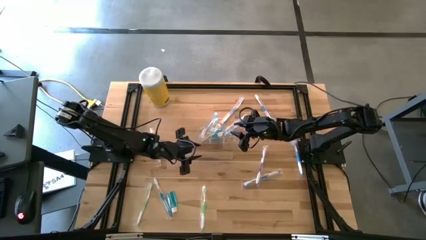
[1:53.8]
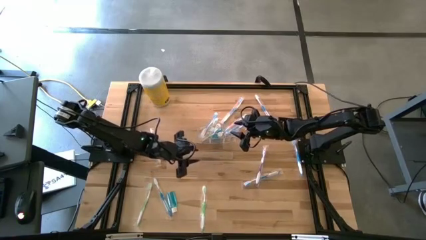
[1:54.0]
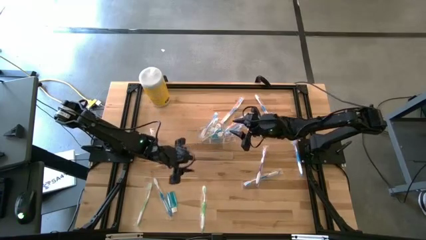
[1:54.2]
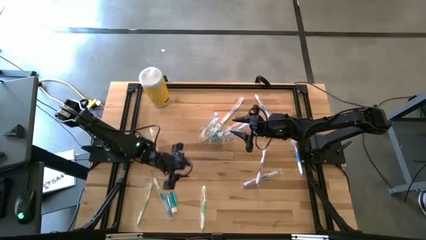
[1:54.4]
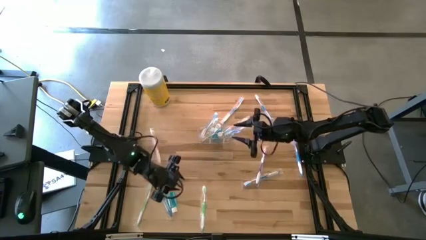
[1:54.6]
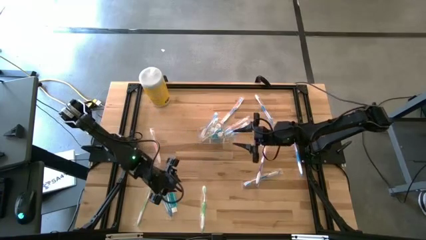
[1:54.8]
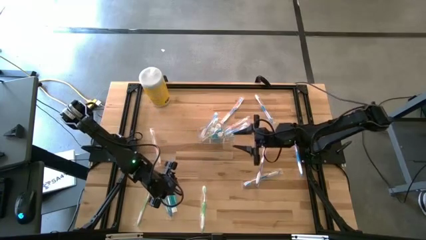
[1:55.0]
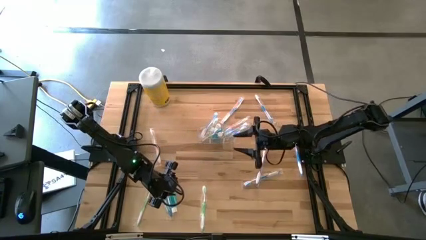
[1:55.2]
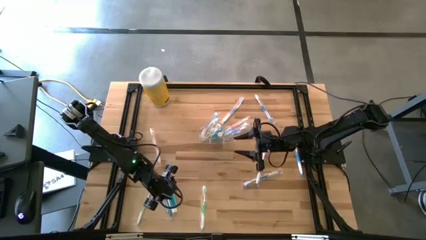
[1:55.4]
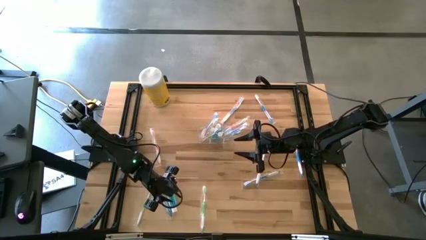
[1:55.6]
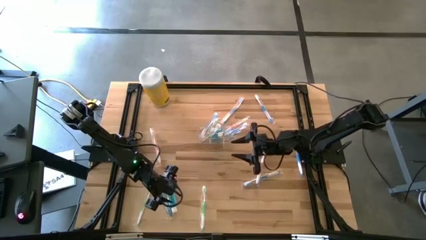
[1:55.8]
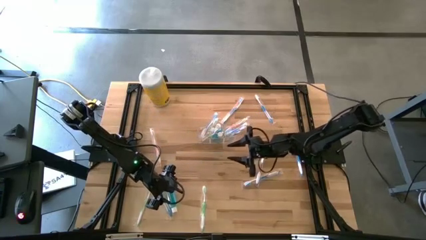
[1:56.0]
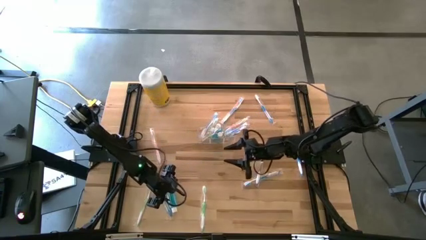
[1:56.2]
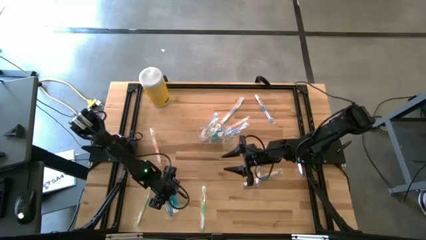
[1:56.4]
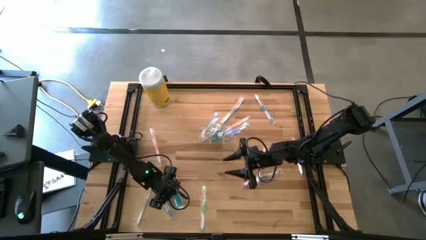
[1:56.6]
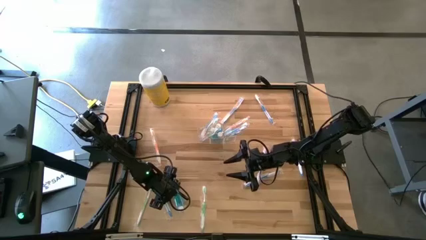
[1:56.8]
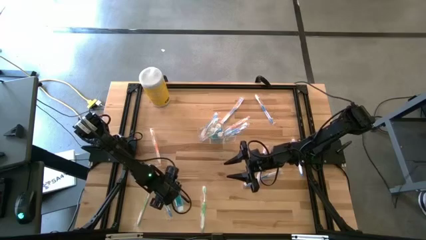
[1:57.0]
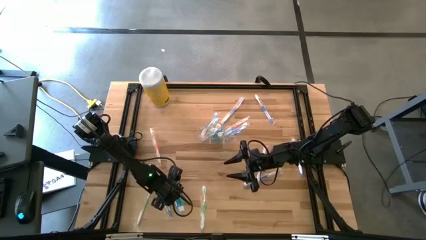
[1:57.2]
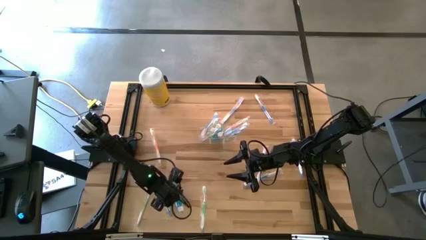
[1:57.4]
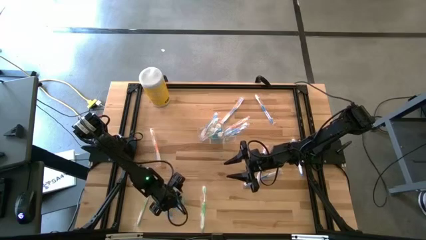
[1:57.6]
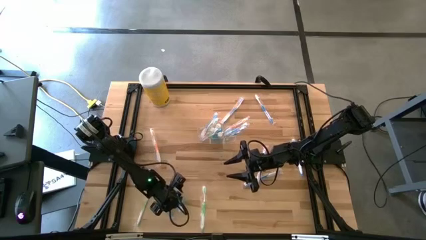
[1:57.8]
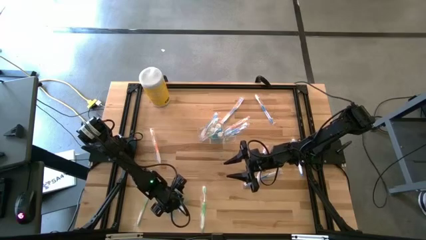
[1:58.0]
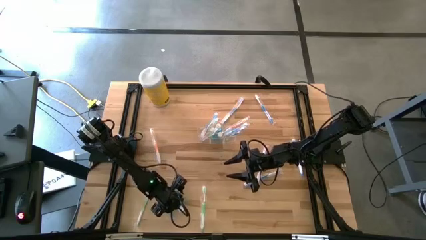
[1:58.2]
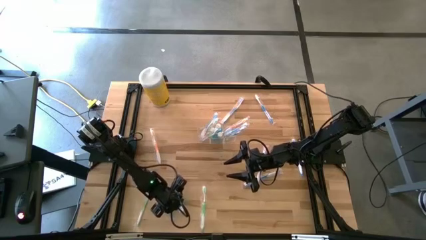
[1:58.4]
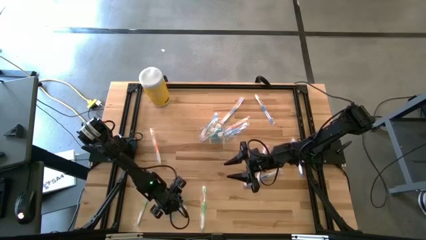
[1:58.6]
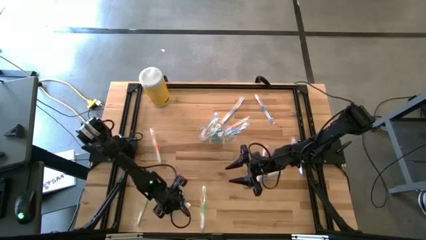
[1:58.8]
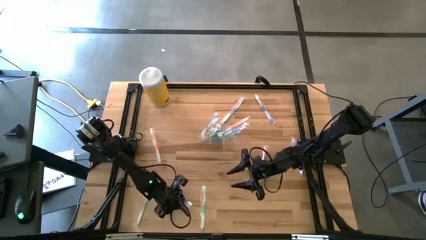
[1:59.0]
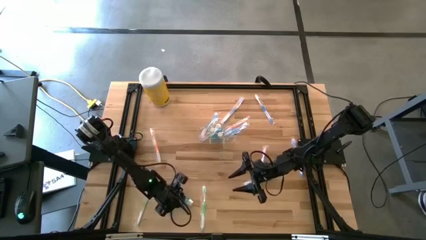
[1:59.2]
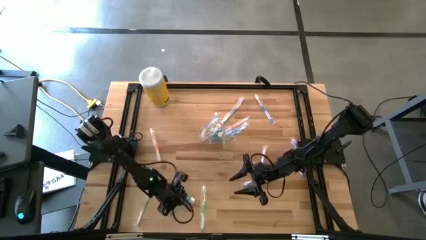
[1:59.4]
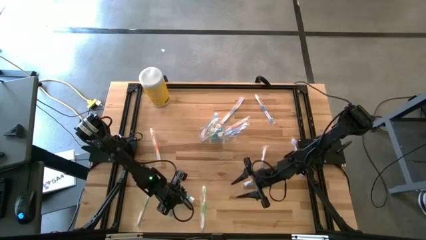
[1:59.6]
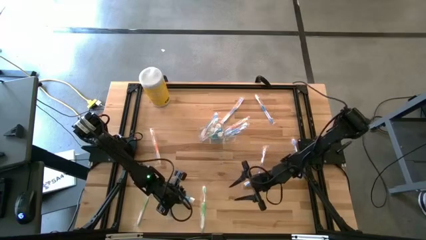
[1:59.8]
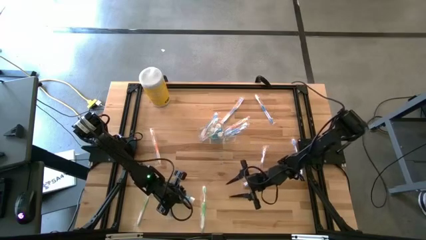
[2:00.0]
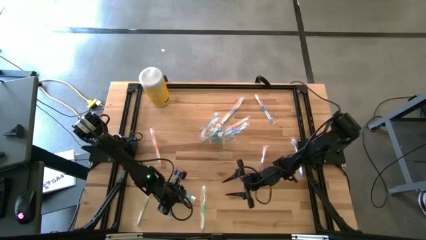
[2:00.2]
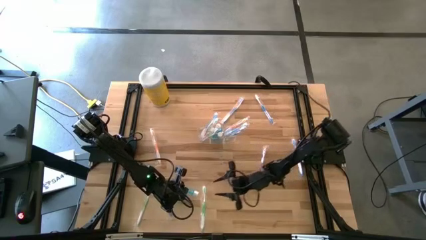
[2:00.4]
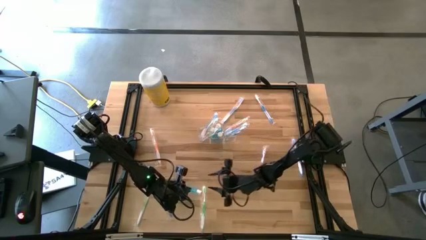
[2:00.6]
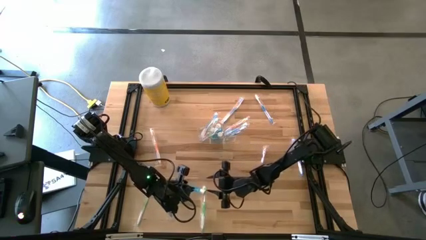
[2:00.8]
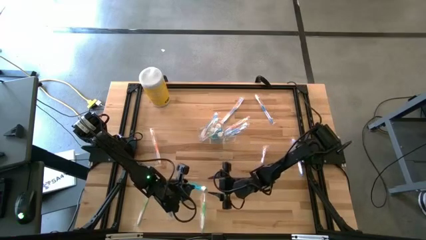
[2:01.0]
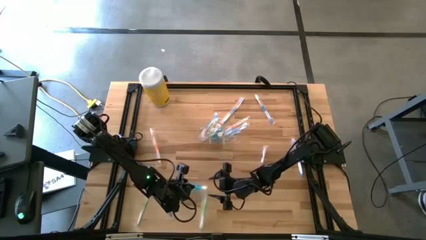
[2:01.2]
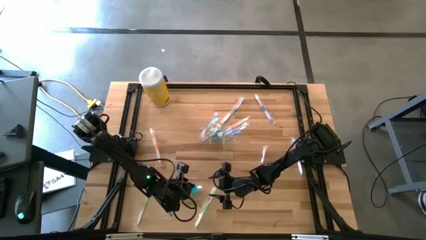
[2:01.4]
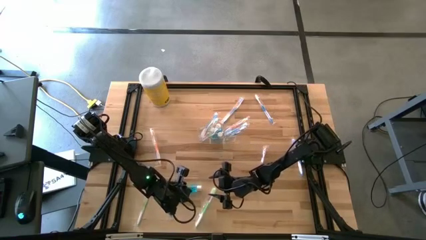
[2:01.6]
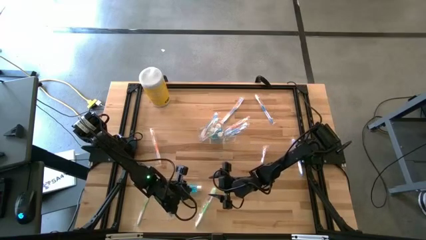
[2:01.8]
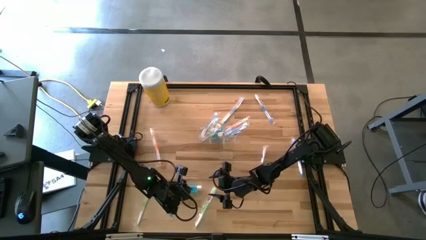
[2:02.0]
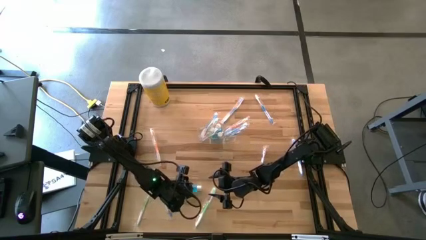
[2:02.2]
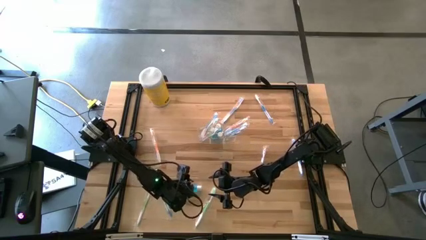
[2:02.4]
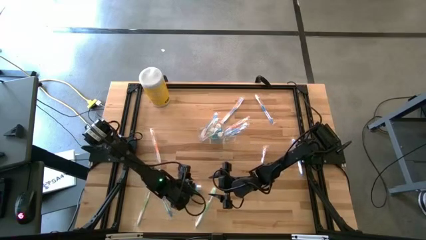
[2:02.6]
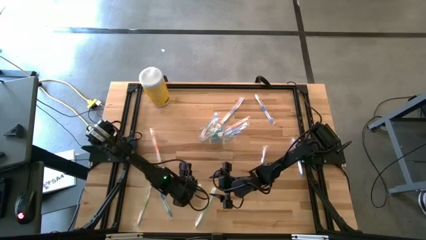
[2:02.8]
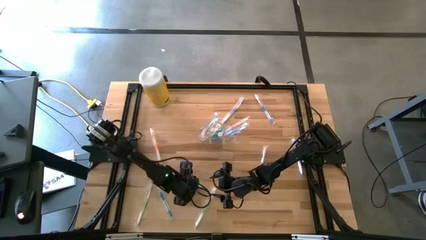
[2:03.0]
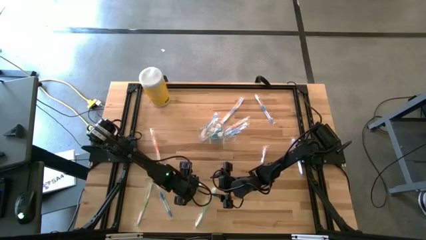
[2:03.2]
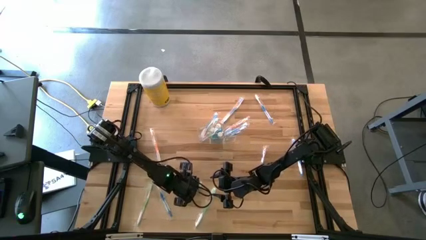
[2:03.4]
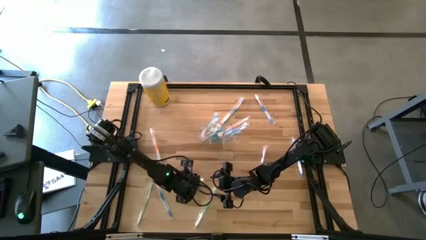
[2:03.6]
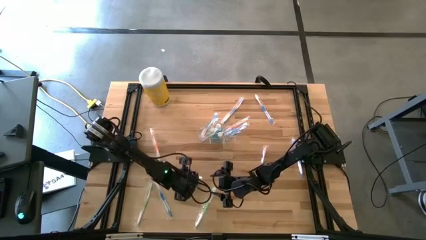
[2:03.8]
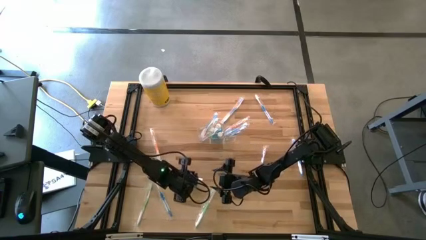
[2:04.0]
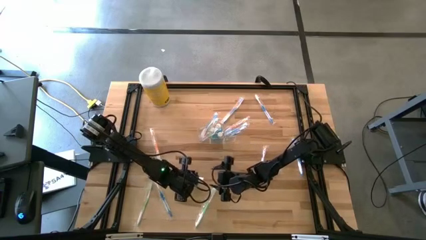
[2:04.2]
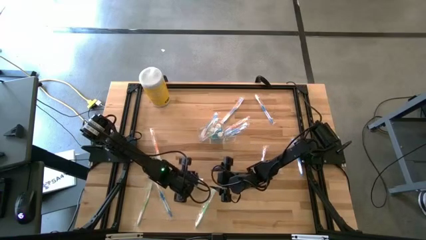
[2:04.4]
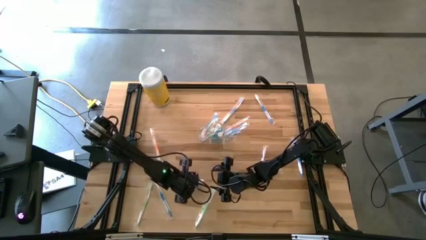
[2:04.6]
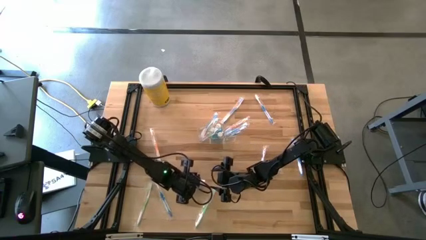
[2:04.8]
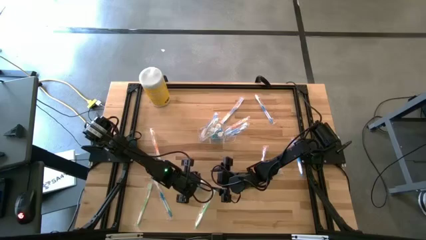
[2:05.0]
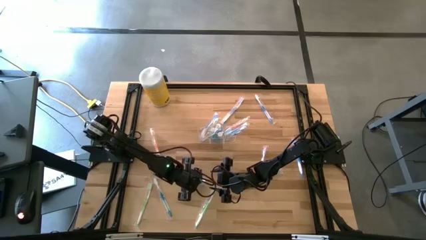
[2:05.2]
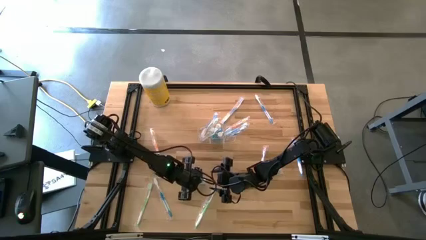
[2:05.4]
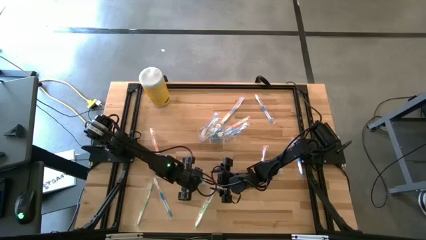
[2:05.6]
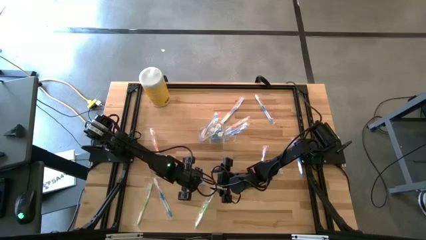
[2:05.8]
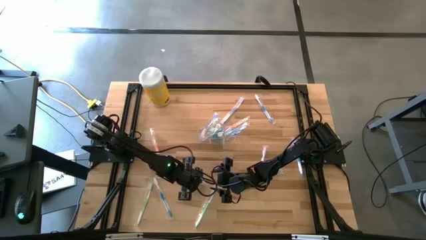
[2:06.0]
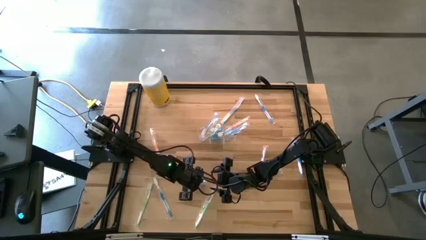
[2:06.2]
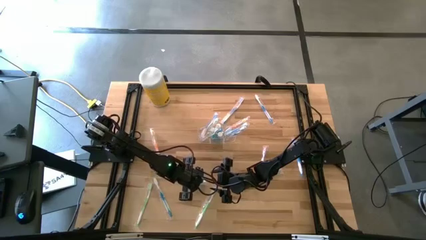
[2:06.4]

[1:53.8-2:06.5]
Task: Pick & Place toothbrushing station
Put the blue mouthwash into the transparent organizer

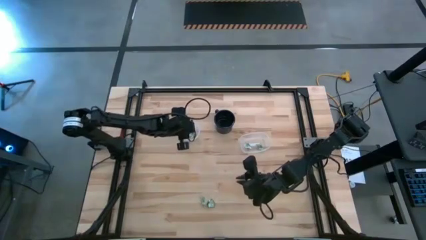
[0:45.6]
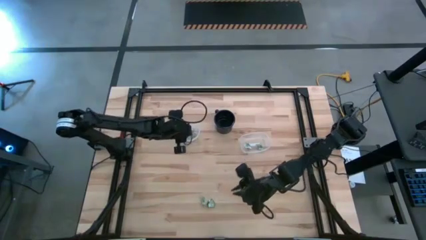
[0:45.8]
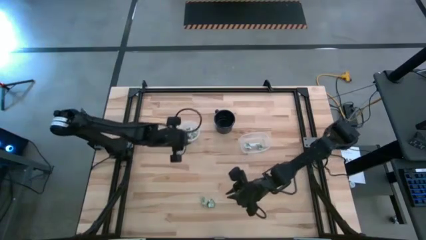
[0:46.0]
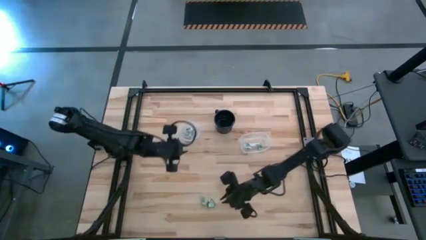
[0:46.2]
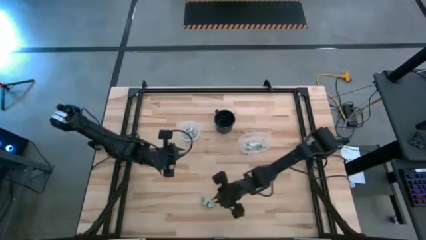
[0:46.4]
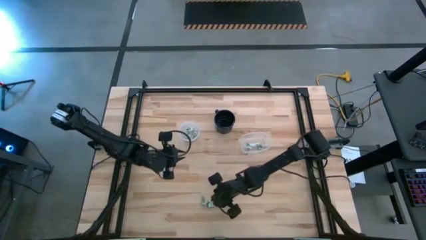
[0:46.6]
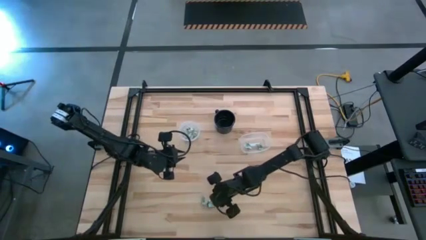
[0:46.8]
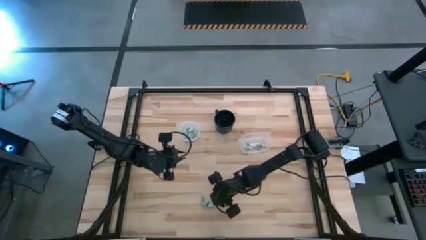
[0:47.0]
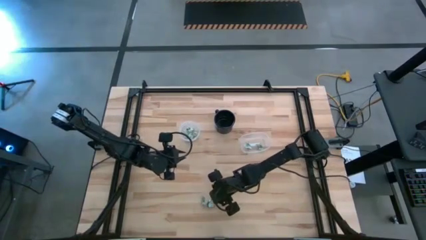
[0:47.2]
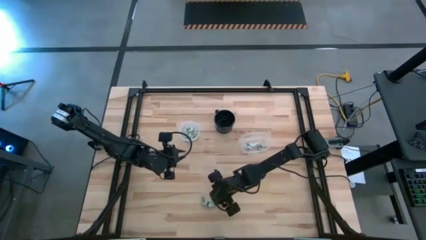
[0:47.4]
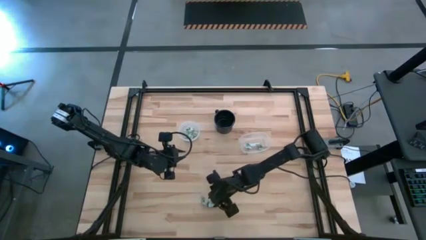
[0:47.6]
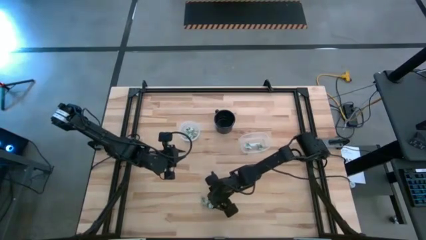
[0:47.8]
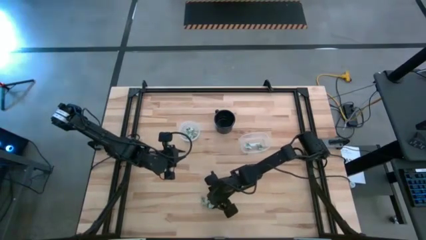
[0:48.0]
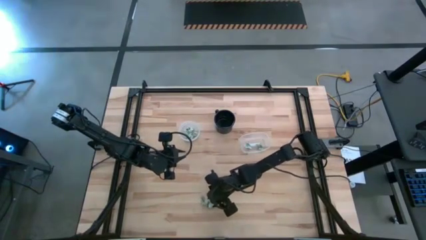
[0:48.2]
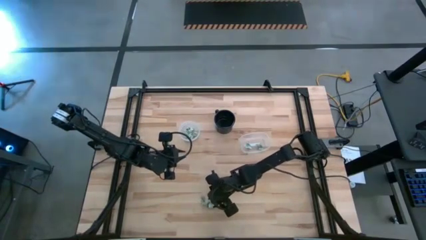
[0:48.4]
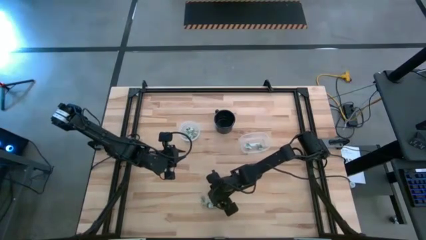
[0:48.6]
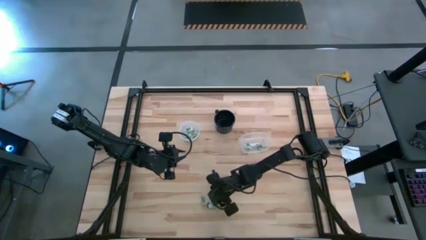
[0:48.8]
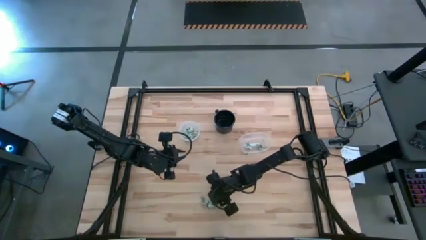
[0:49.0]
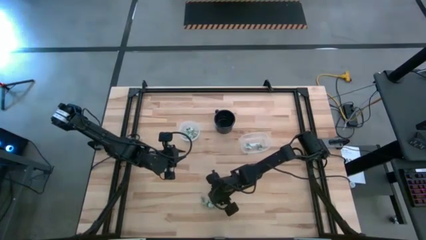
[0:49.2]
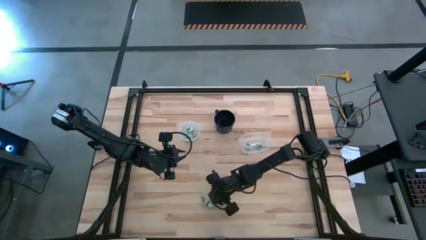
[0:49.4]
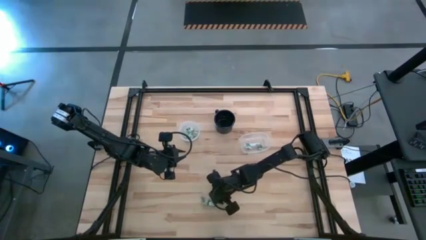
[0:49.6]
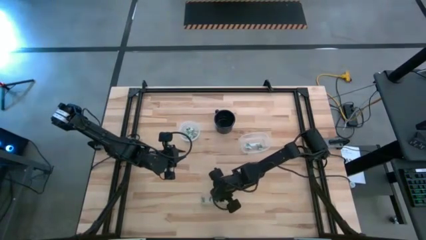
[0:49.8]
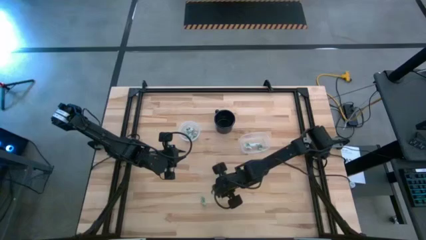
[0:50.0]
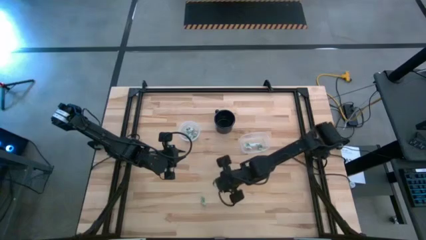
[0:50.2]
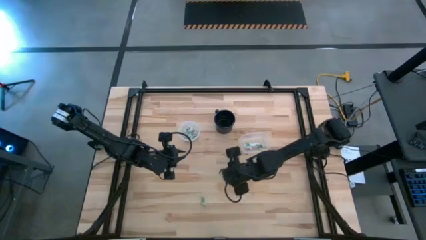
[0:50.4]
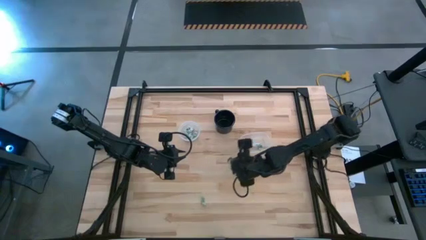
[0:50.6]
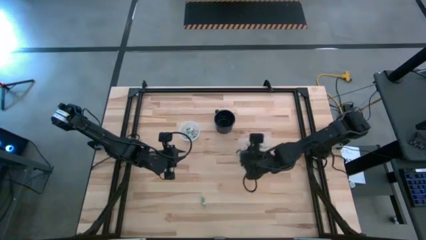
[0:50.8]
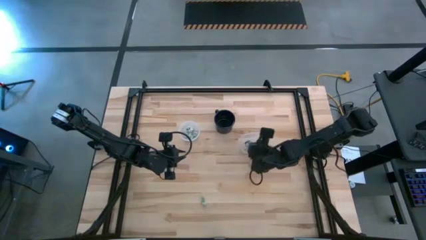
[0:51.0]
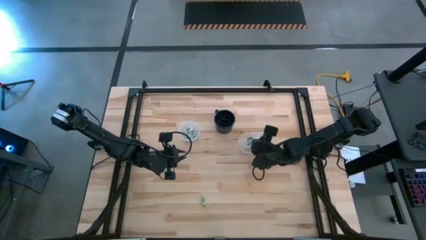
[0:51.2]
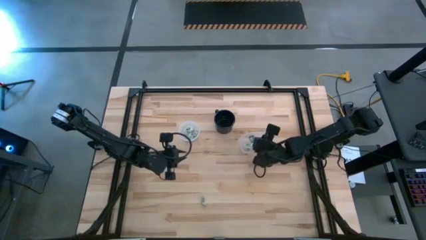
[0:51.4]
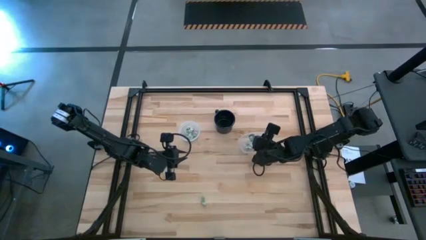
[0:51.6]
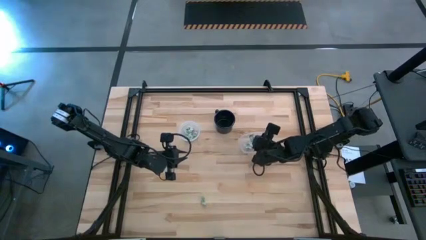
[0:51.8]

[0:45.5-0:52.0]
Task: Pick and place items into bin
Put the green stevia packet into the right transparent bin
